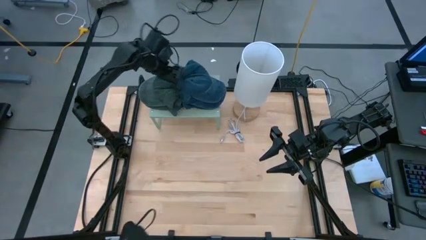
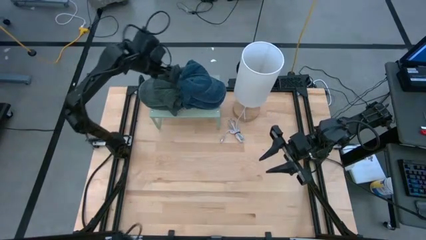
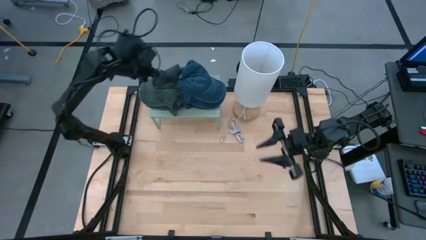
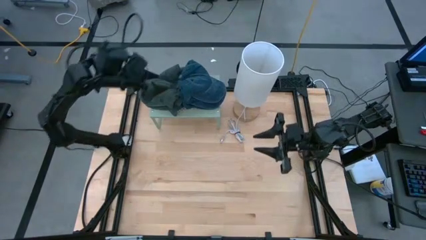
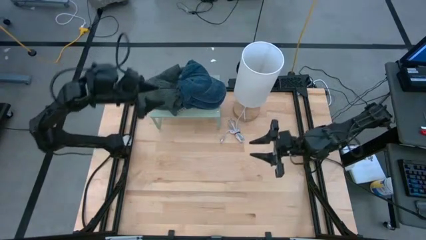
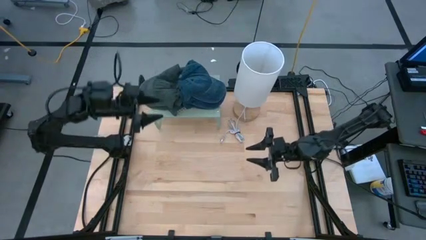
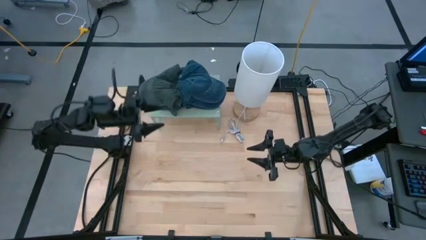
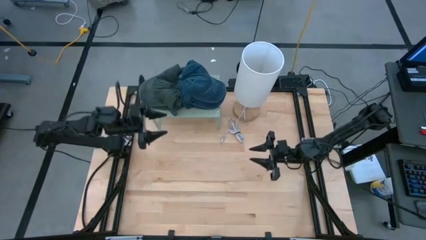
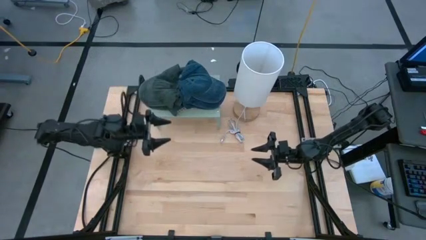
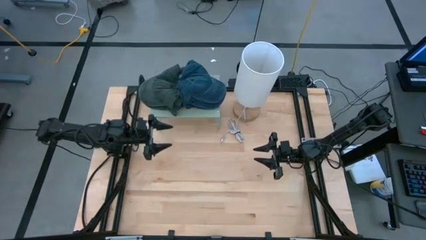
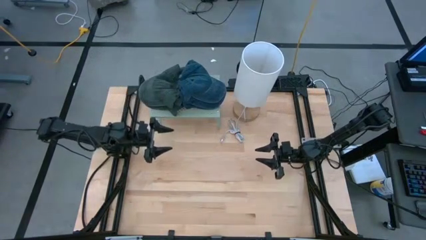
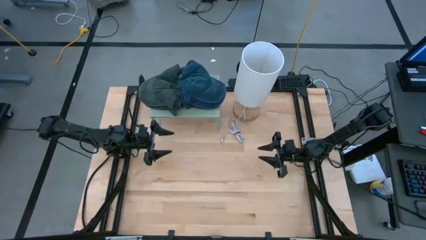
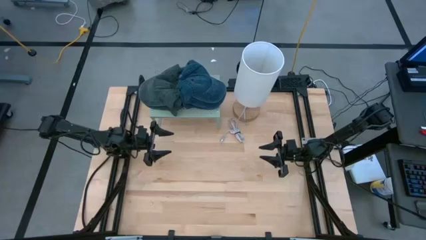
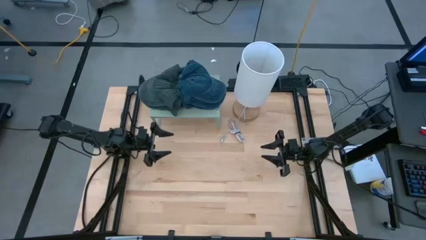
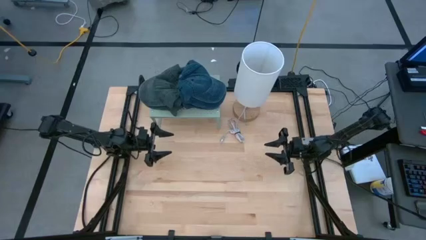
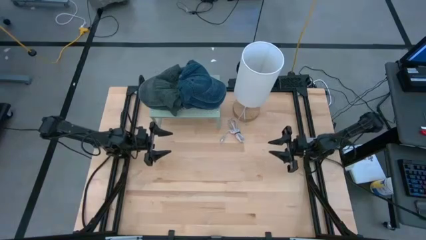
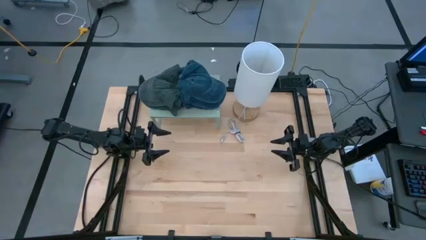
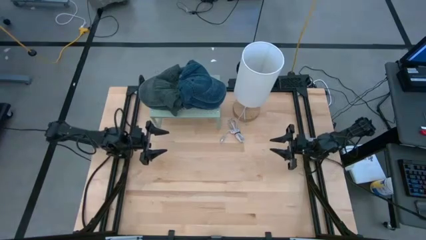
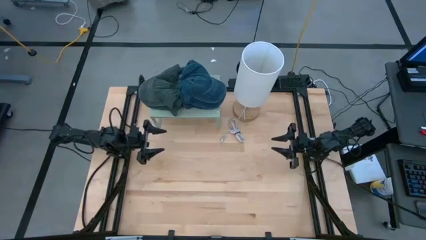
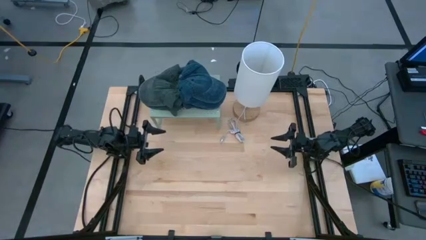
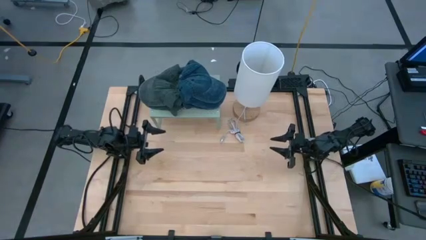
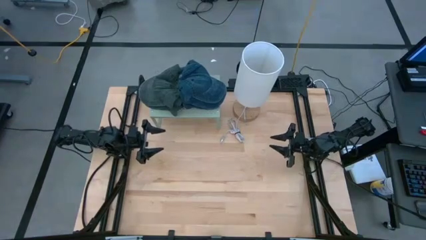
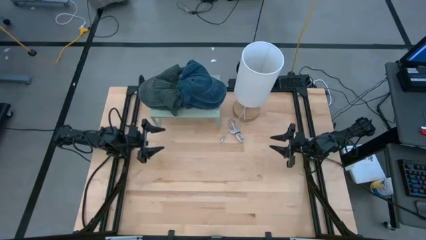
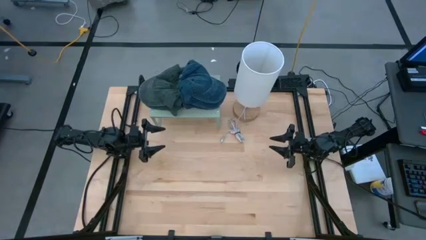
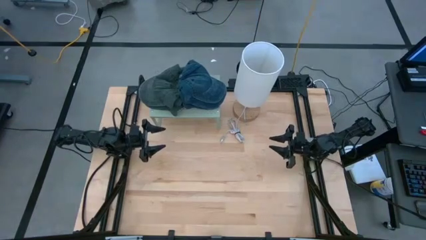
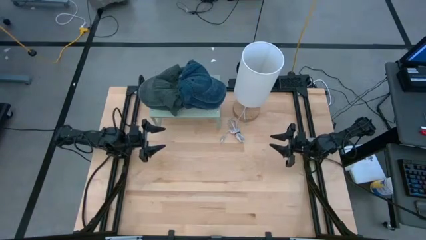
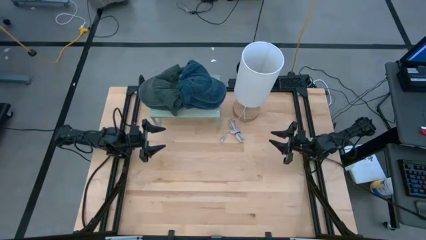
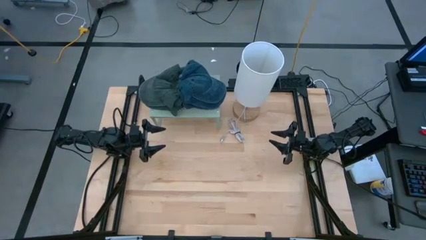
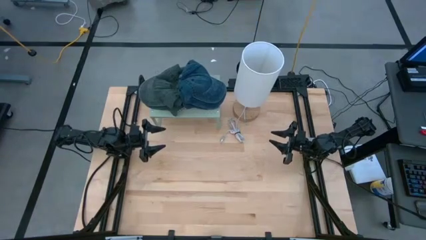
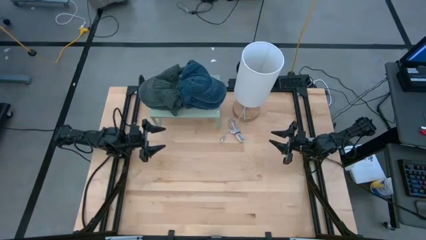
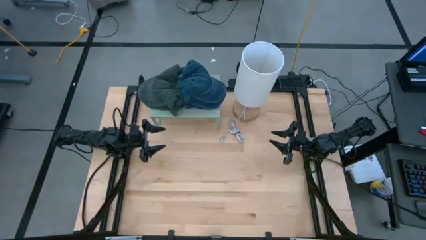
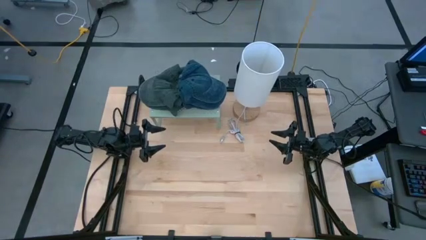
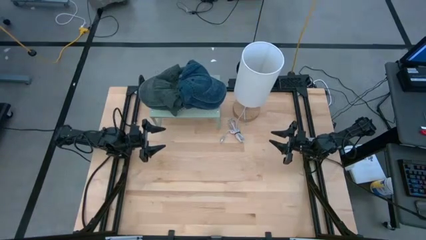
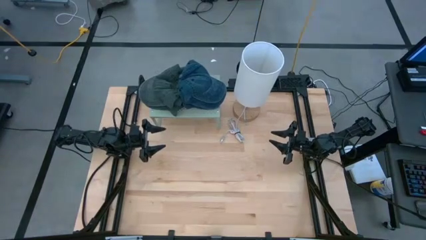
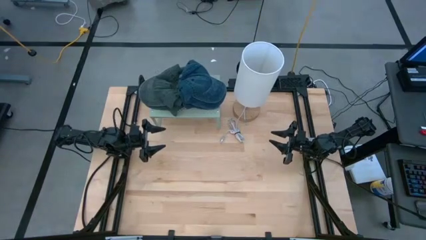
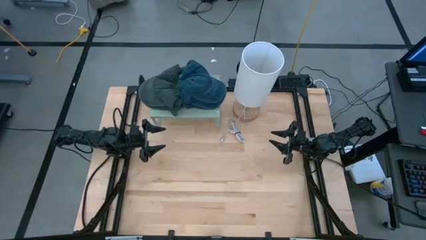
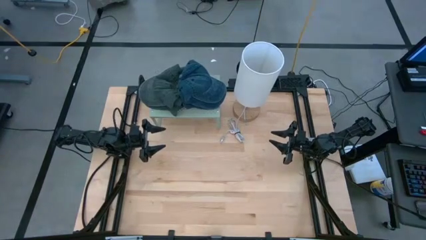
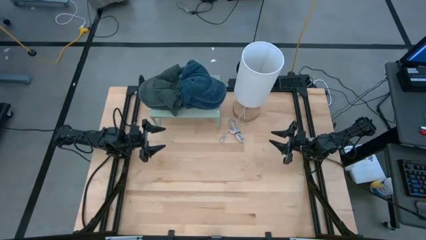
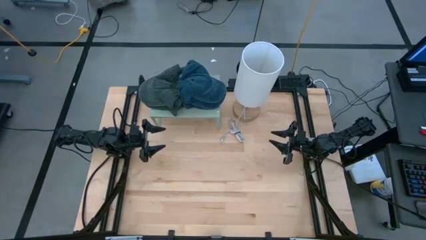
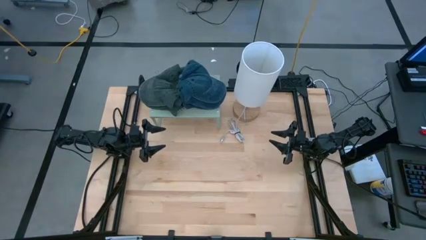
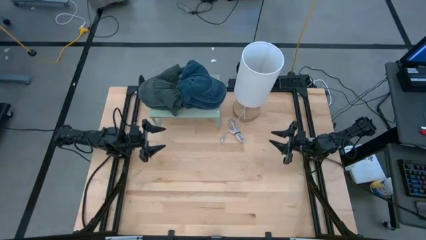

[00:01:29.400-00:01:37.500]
Task: Pick & Place hat
Return to Home Position
